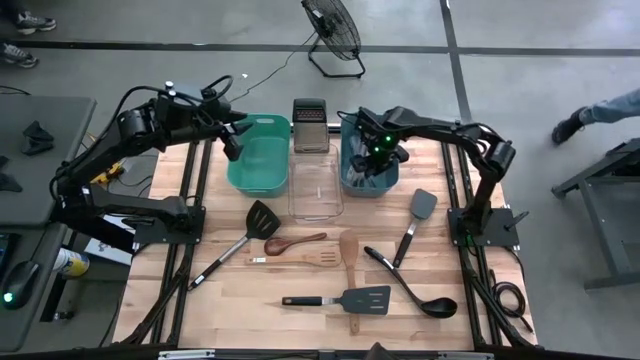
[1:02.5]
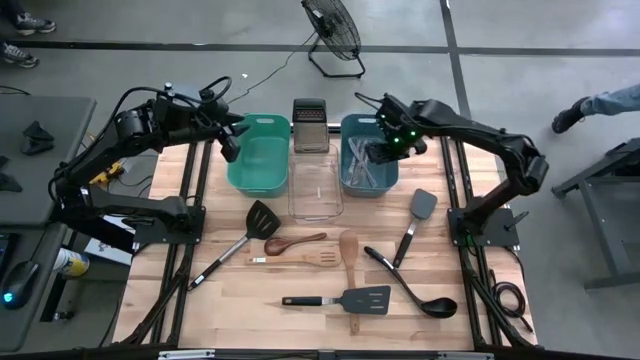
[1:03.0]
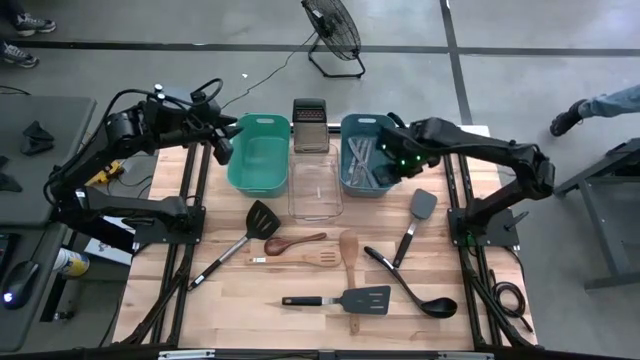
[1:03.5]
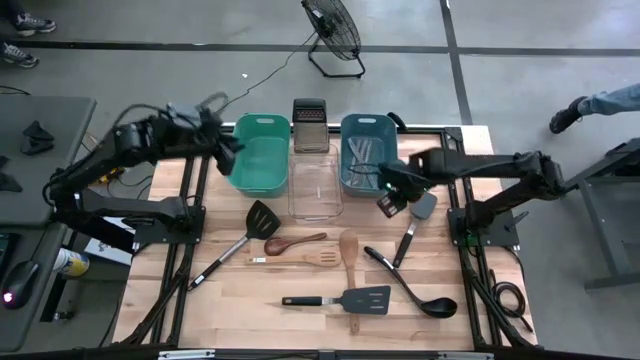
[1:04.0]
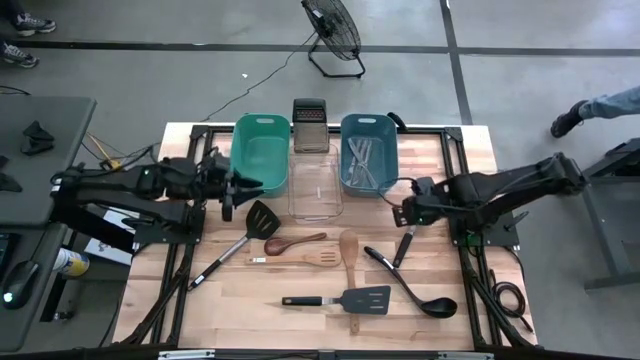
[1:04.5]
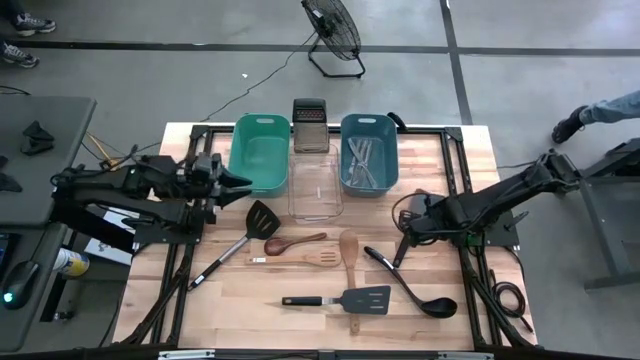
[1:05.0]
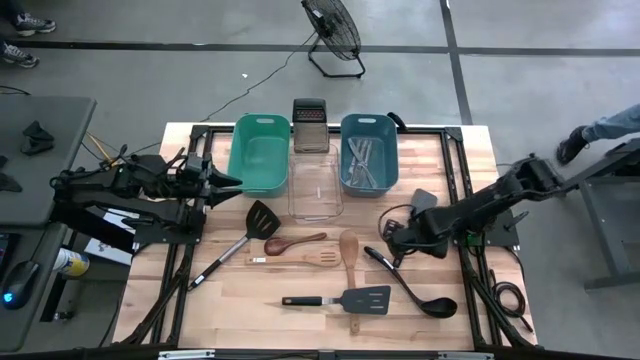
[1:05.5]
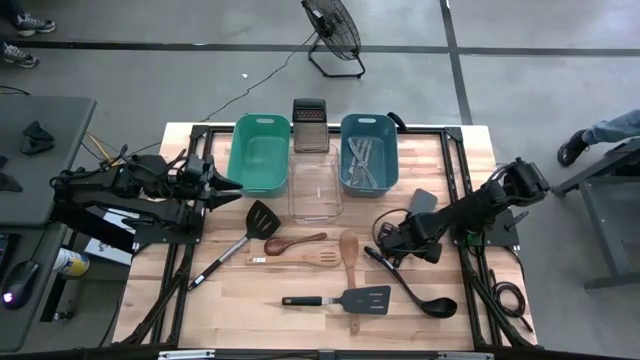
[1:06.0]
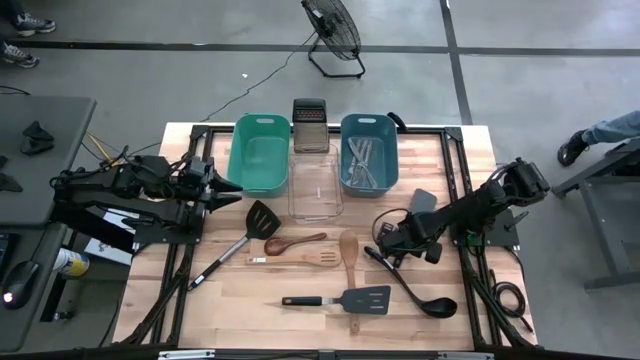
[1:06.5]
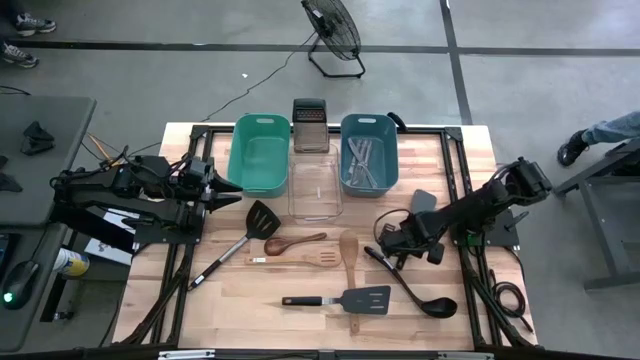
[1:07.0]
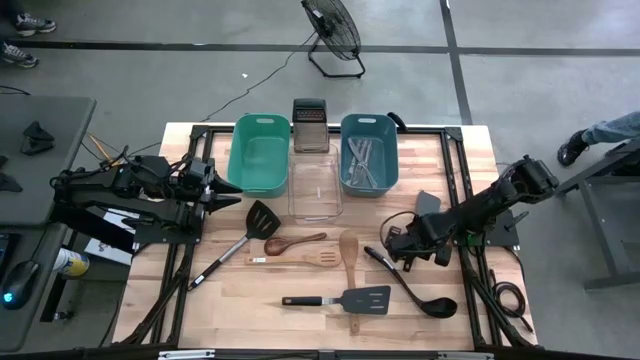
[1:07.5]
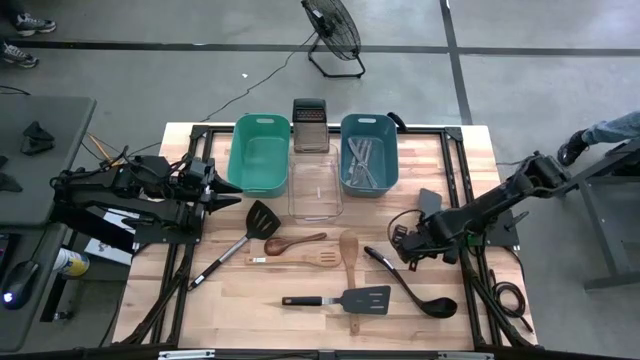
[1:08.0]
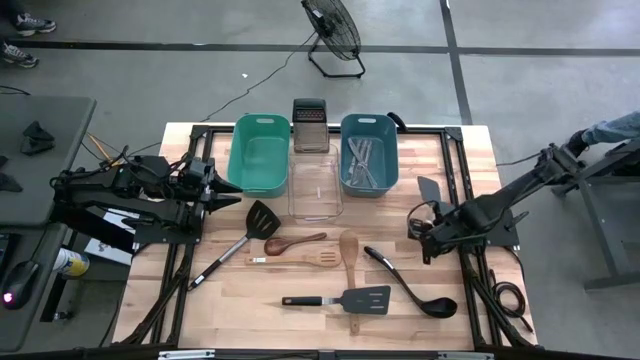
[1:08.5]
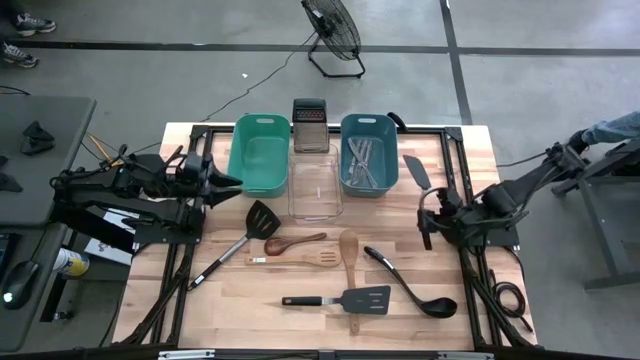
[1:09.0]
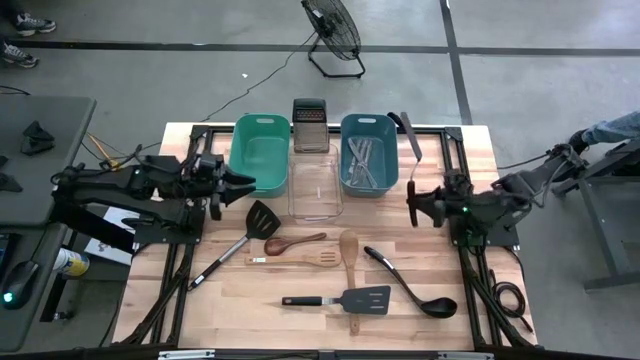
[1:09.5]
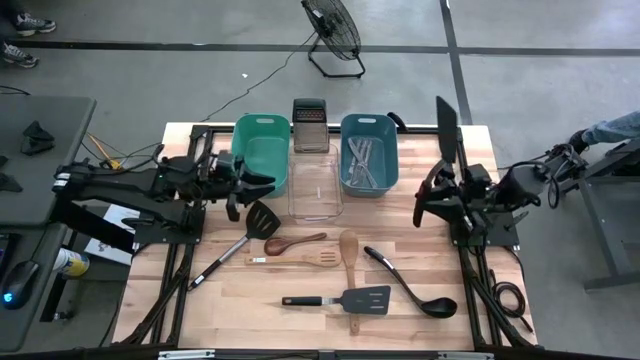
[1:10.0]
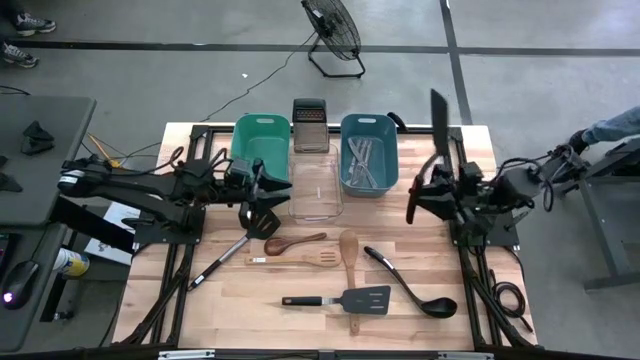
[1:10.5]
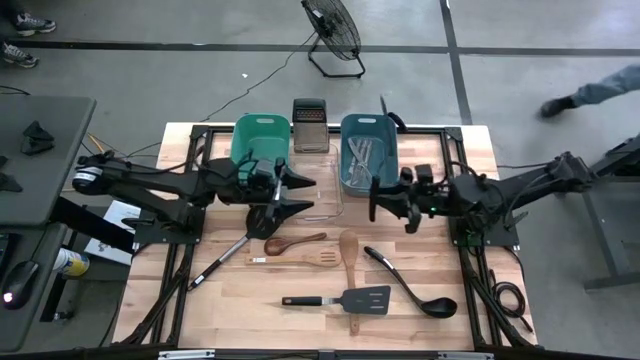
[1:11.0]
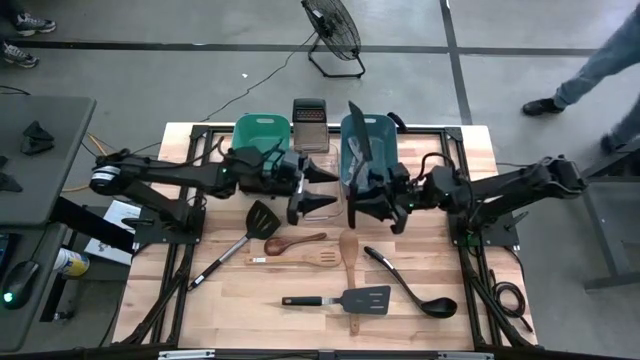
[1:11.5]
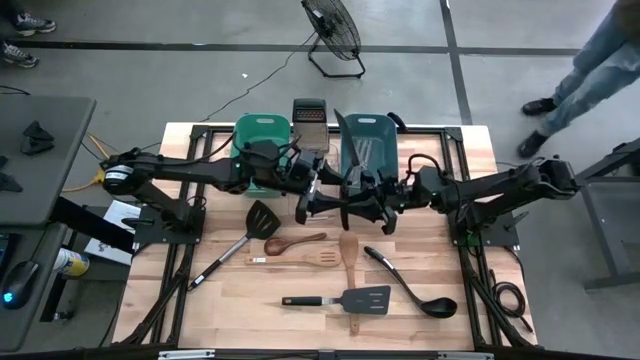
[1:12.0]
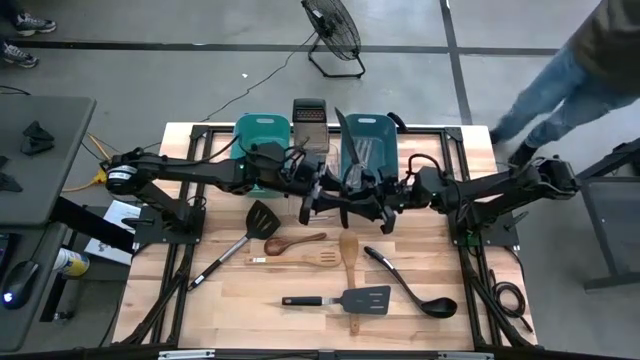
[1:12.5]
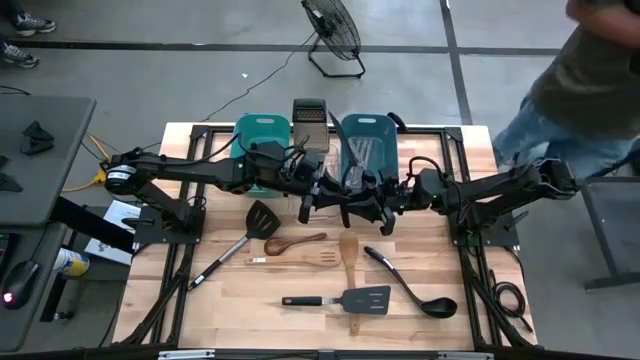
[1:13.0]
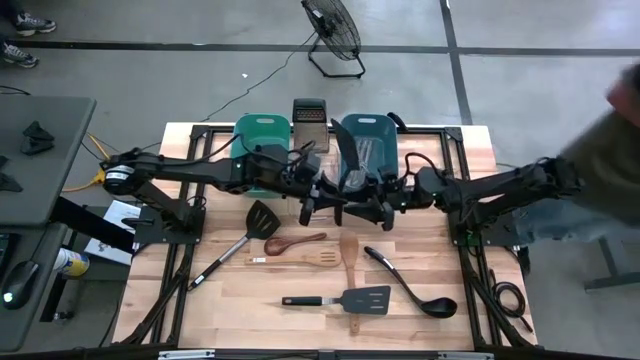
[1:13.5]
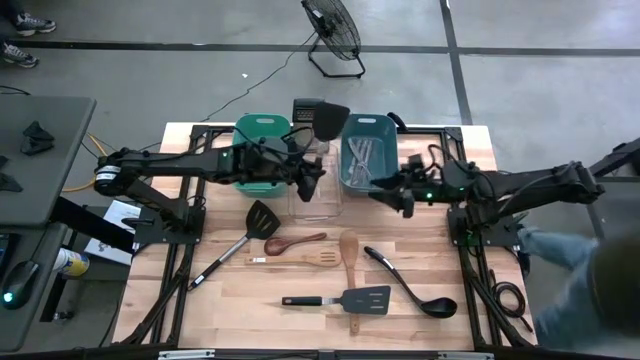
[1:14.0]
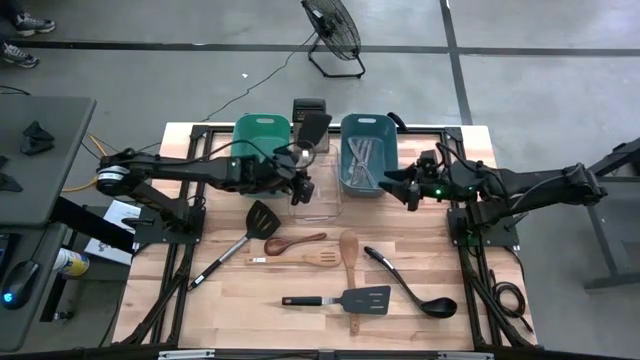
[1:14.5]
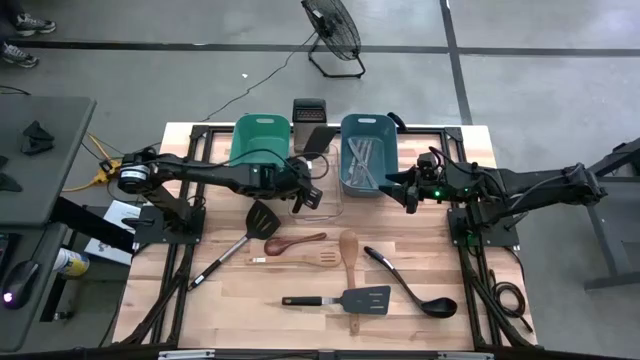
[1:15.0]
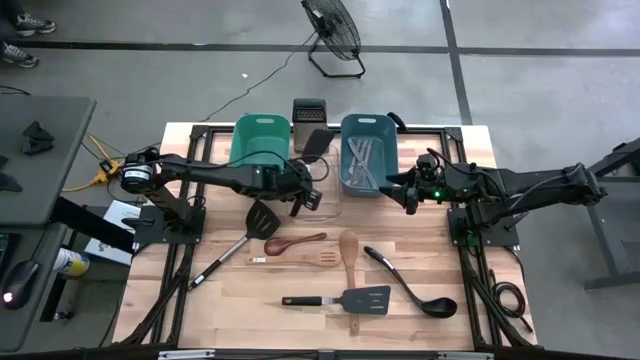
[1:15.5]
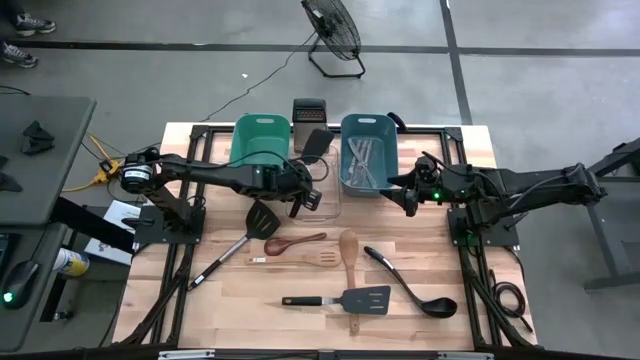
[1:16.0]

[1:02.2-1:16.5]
Task: Pick & Place Kitchen Items
Put the black spatula into the transparent bin

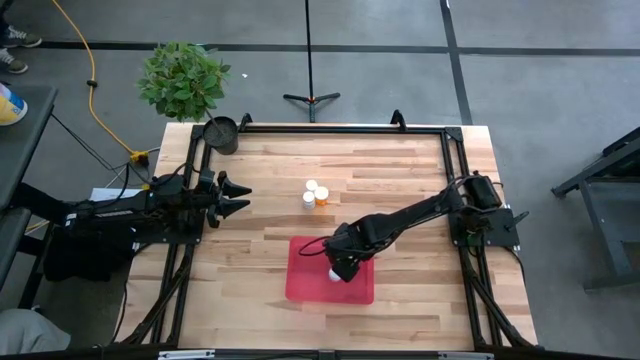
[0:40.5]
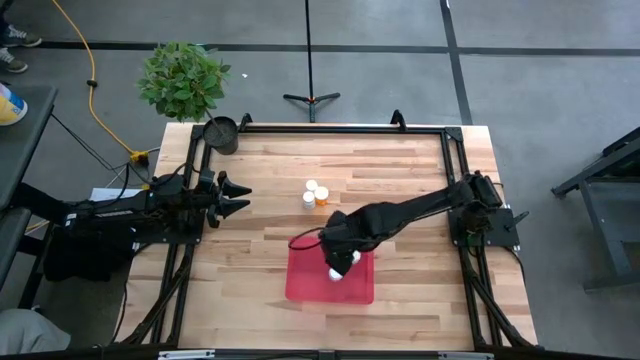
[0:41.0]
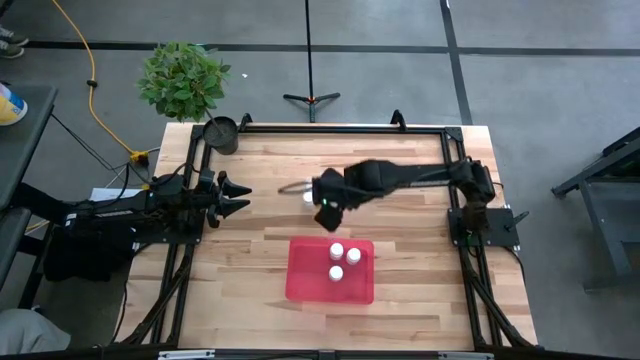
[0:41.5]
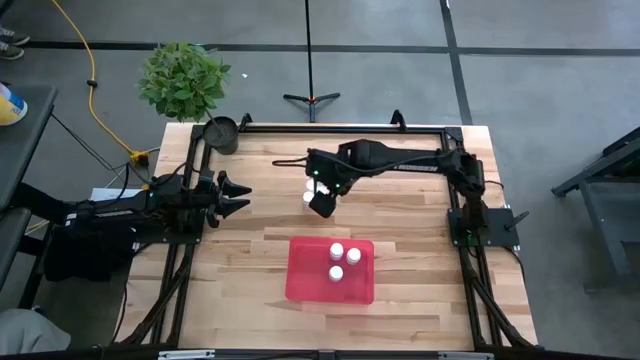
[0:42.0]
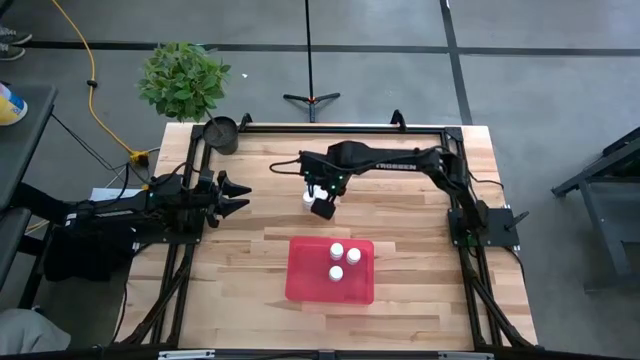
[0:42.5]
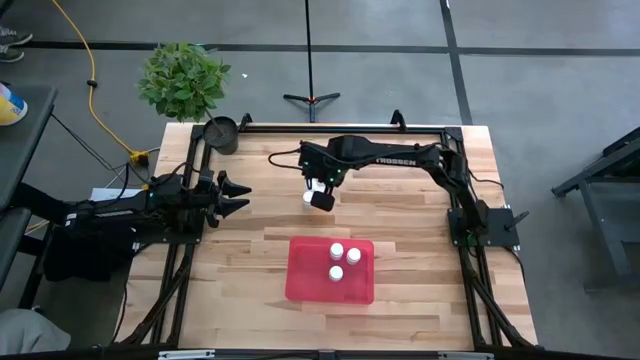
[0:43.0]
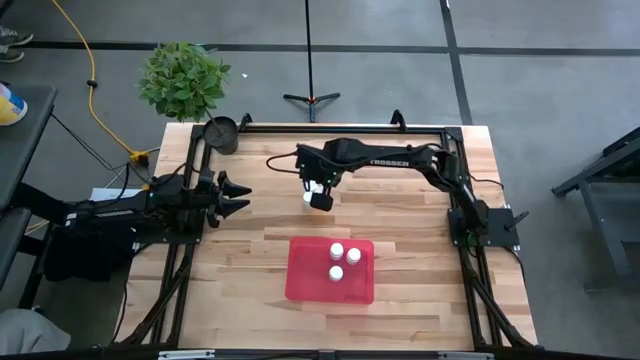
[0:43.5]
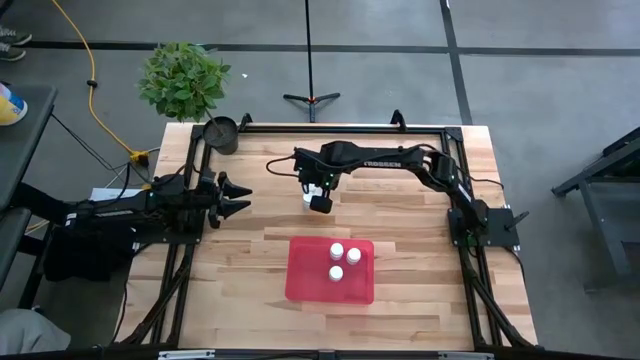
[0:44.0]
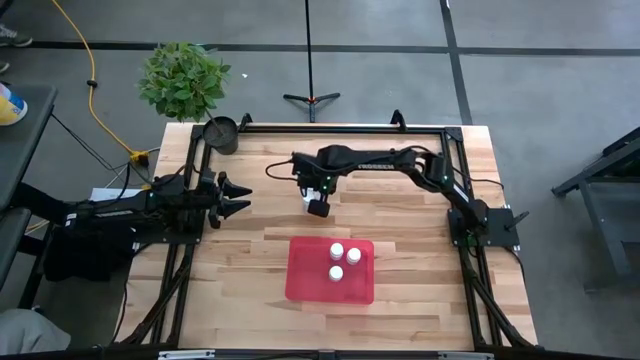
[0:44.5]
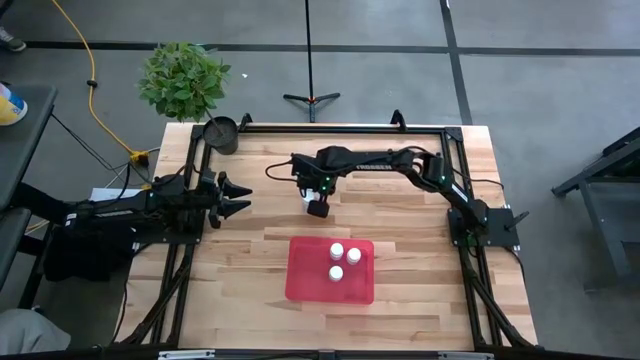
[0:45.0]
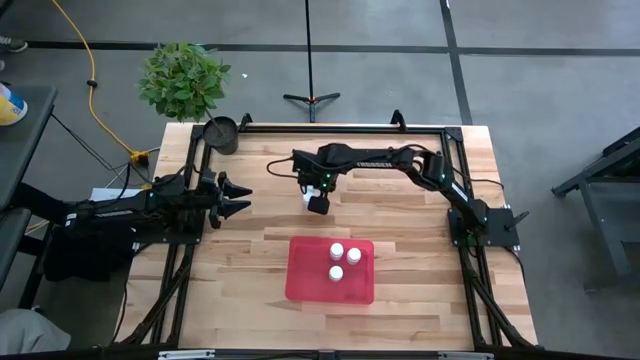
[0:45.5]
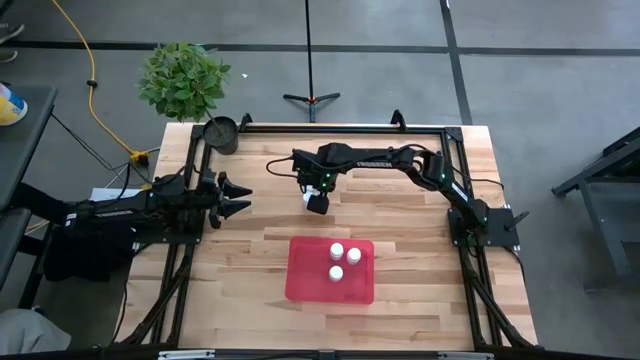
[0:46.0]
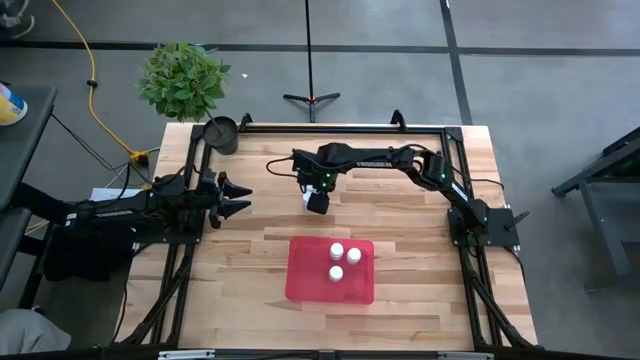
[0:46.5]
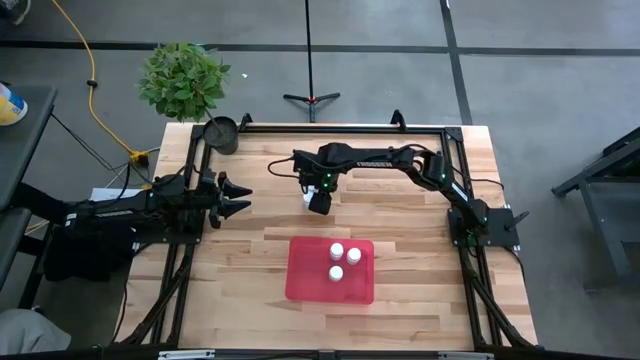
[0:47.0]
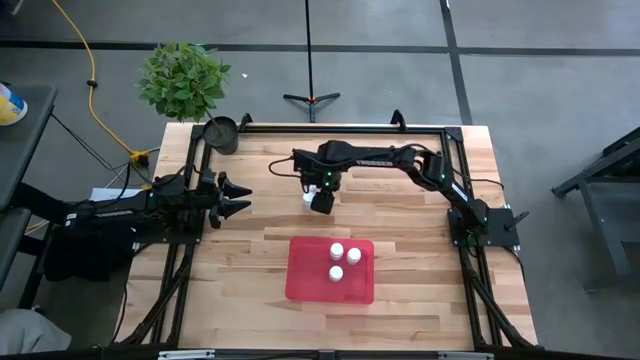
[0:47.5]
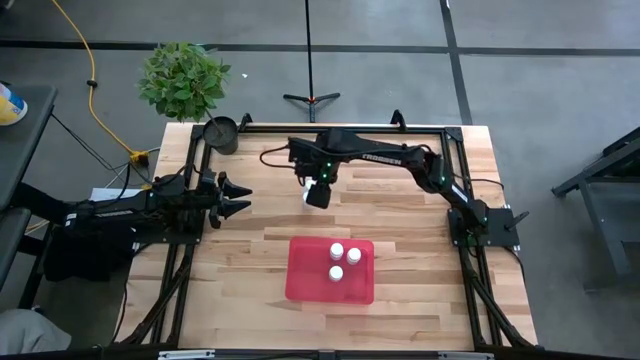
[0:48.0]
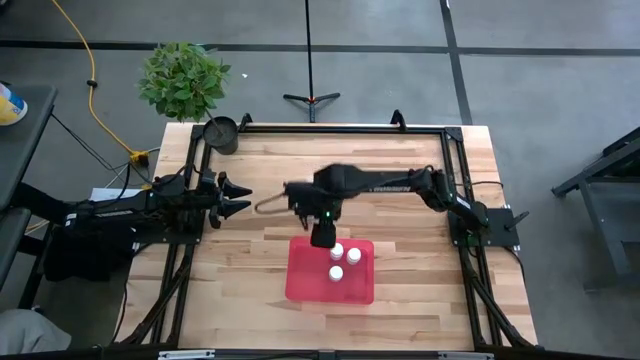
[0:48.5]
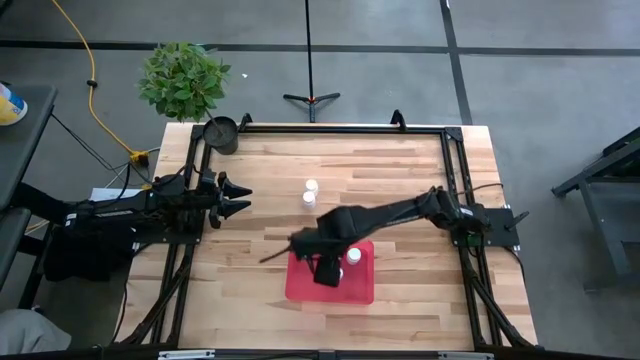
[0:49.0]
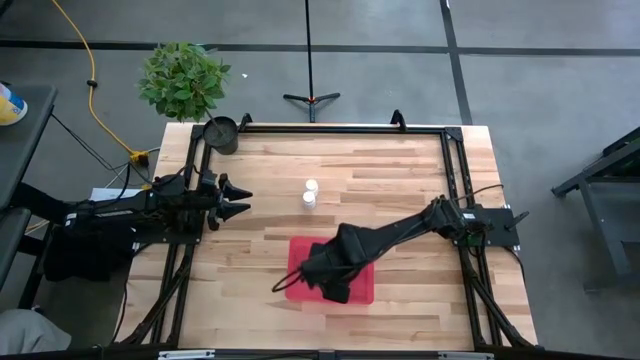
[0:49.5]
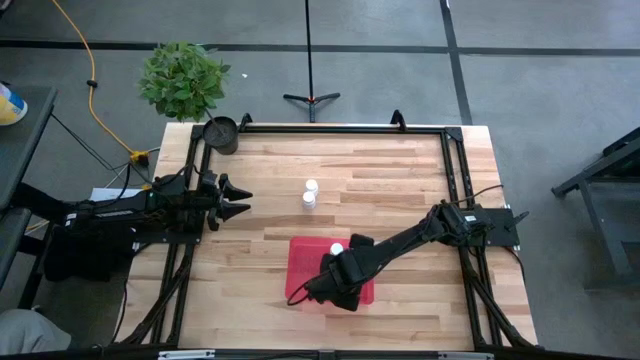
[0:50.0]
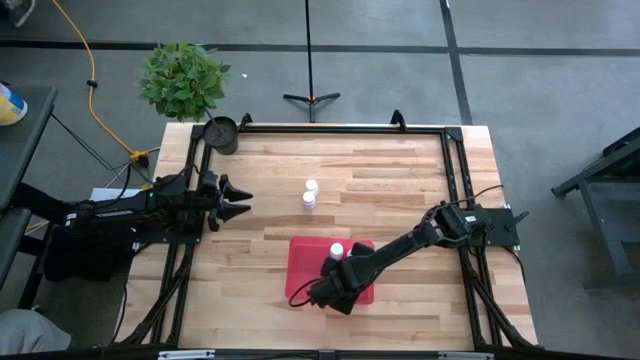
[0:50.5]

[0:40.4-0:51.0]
Task: Pick and place pill bottles into a basket
Put the orange pill bottle into the bin
